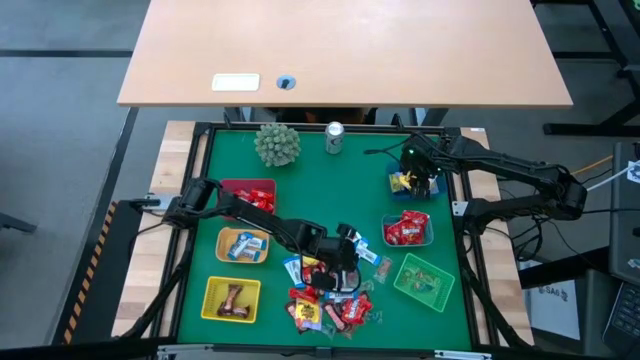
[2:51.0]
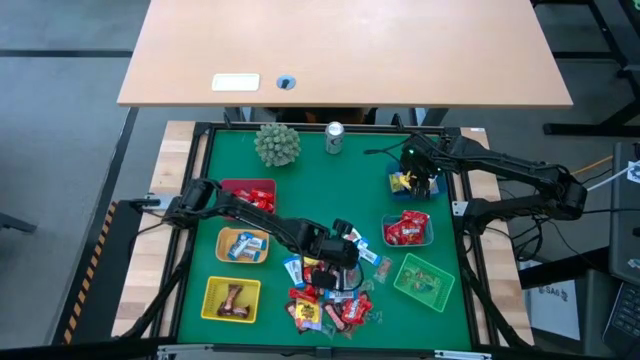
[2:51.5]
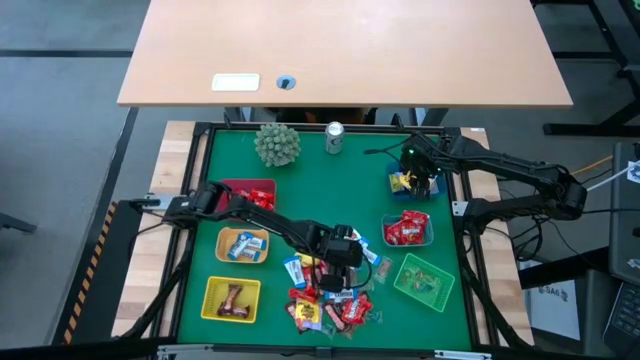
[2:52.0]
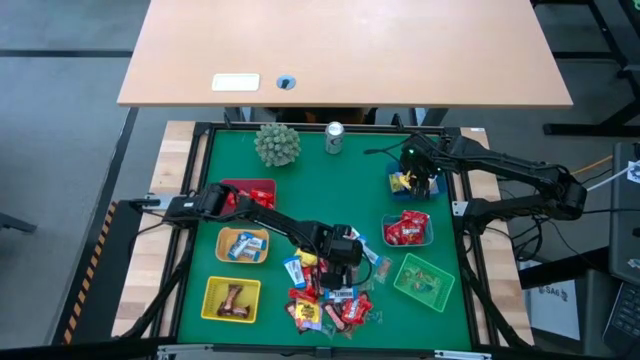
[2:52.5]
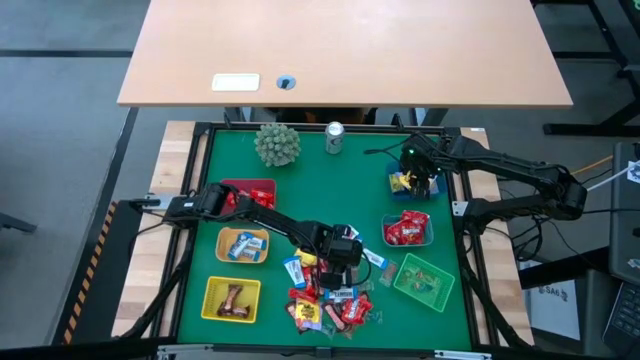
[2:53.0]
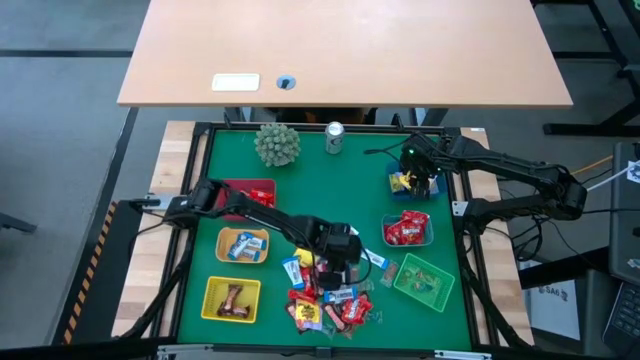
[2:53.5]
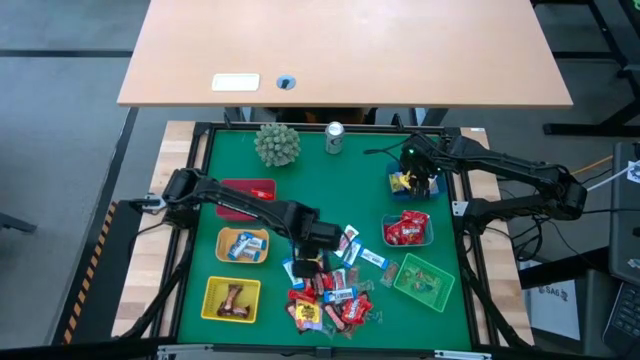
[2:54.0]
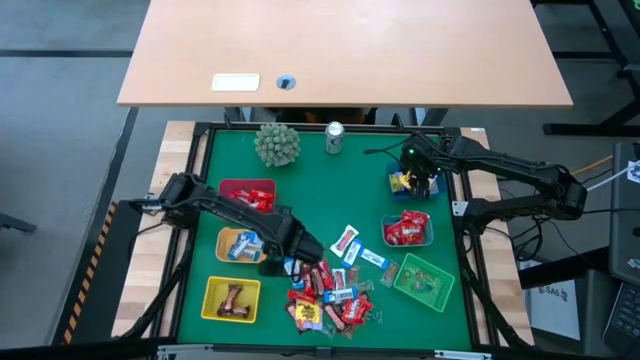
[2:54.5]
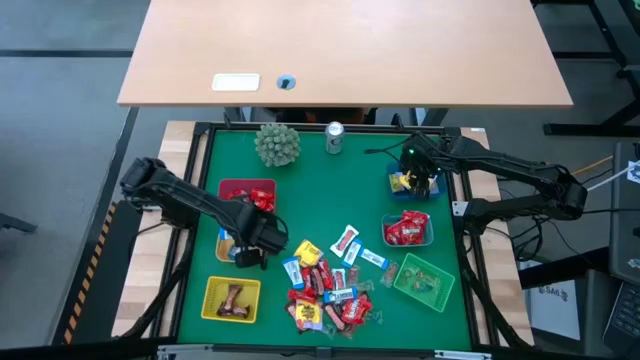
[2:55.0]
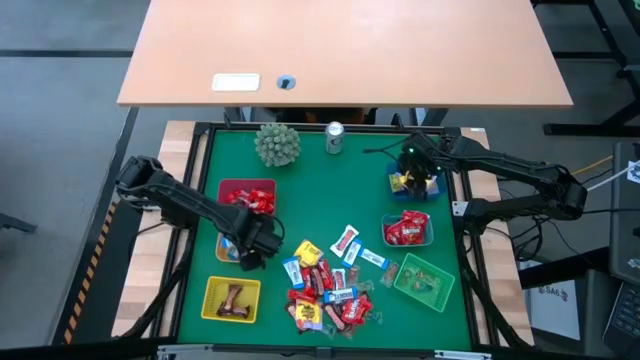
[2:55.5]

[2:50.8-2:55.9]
Task: Sort candy
Put the white chocolate bar into the orange bin

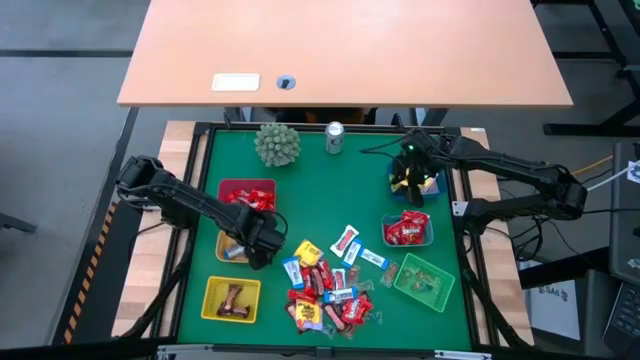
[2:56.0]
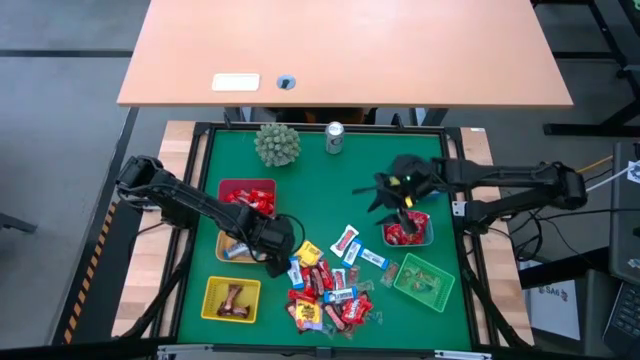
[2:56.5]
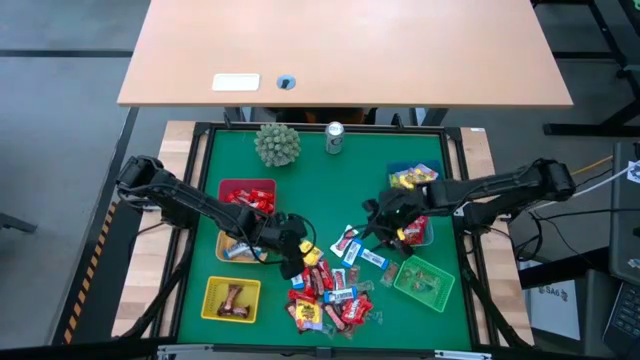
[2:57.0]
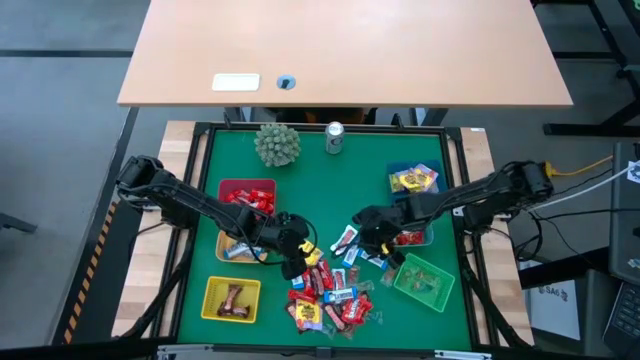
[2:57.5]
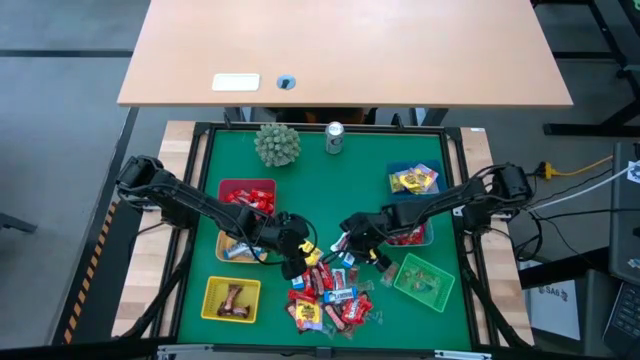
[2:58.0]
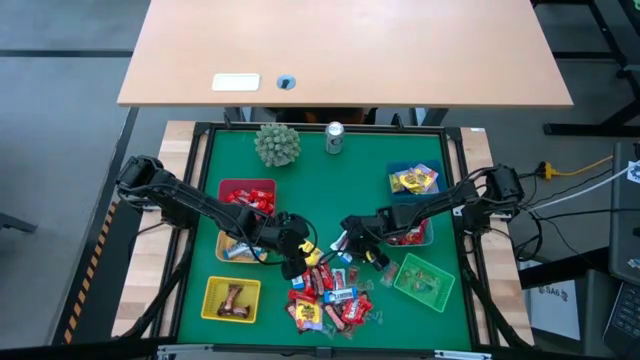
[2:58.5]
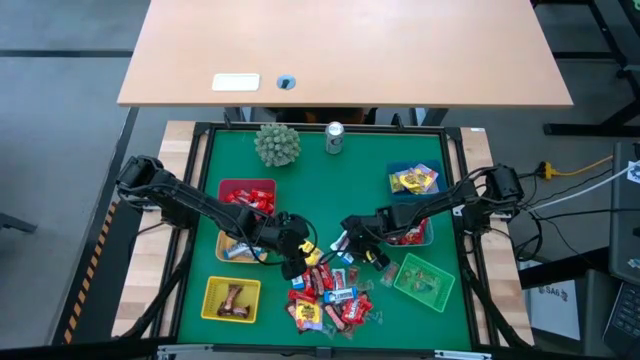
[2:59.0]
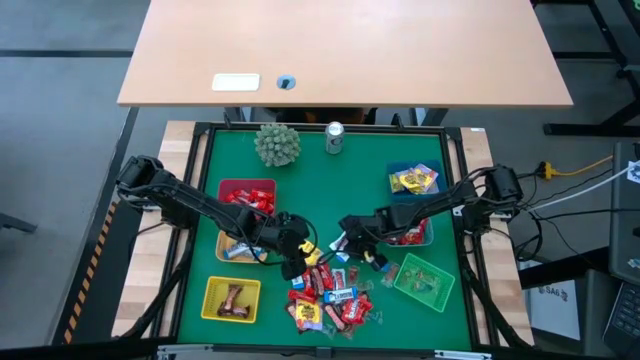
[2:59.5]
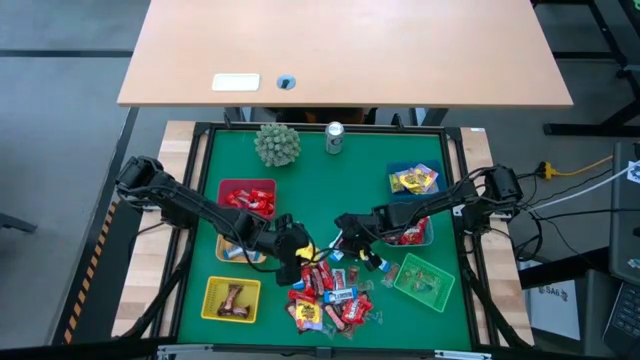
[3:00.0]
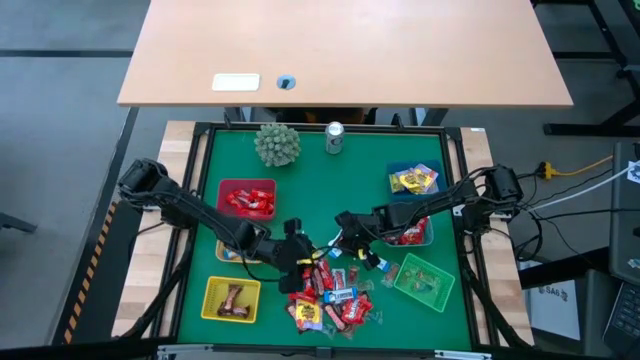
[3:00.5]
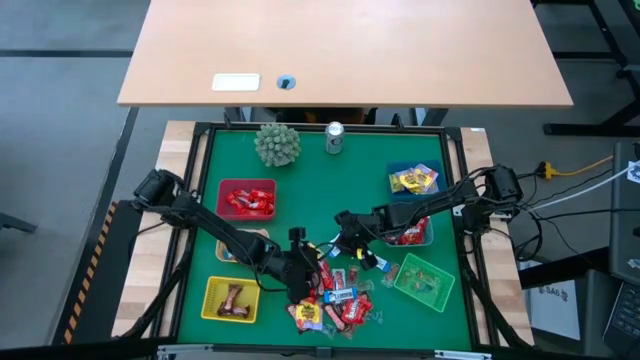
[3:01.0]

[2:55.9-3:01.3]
Put the white chocolate bar into the orange bin

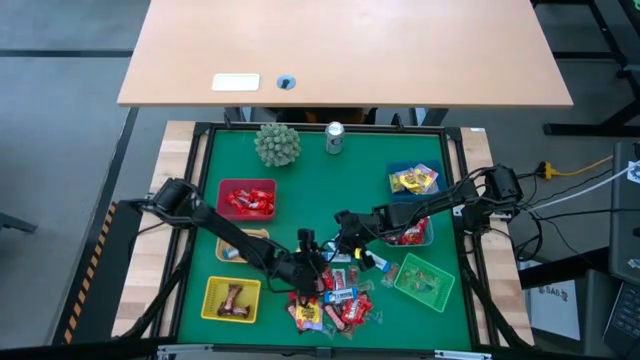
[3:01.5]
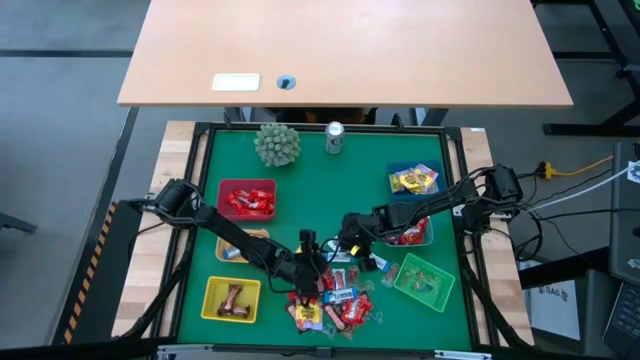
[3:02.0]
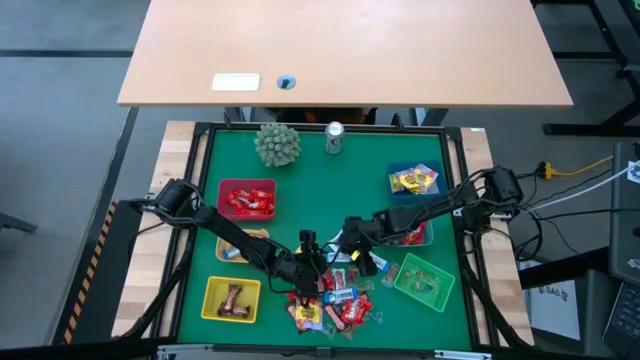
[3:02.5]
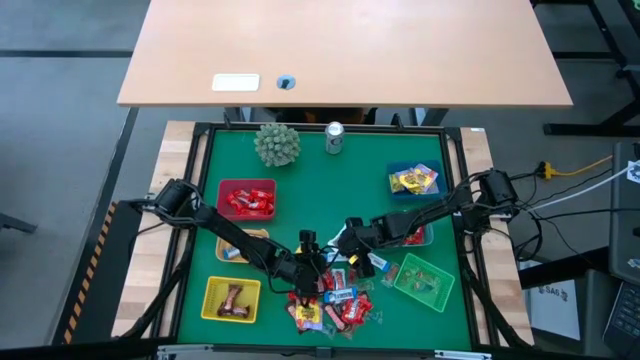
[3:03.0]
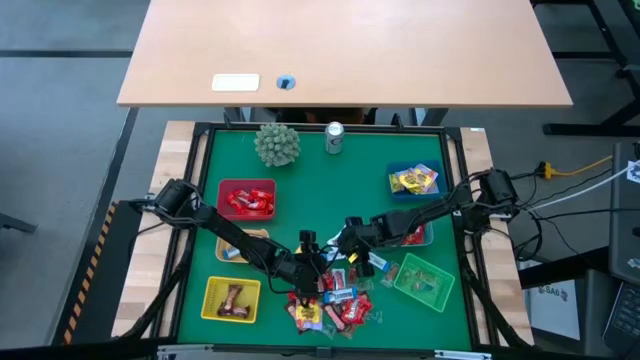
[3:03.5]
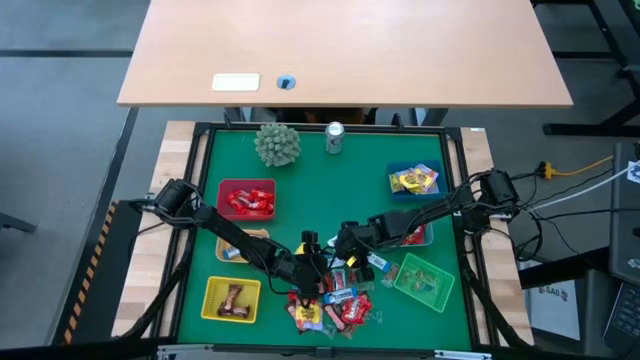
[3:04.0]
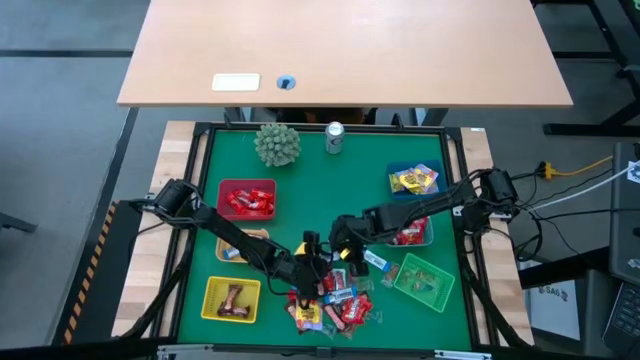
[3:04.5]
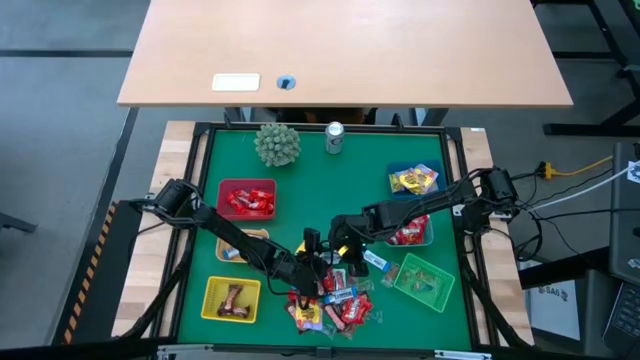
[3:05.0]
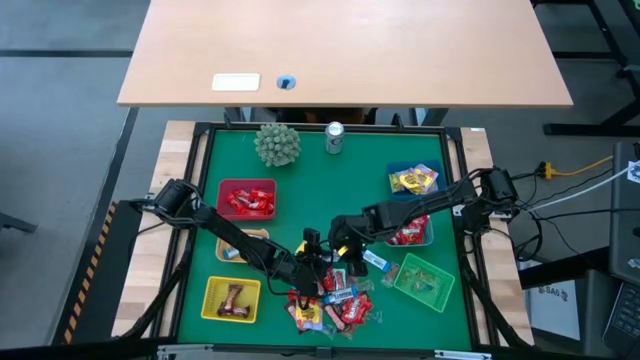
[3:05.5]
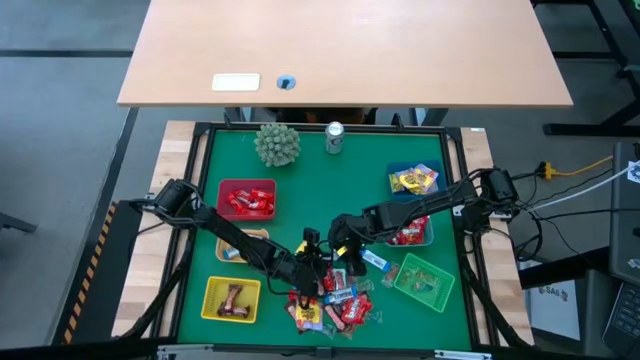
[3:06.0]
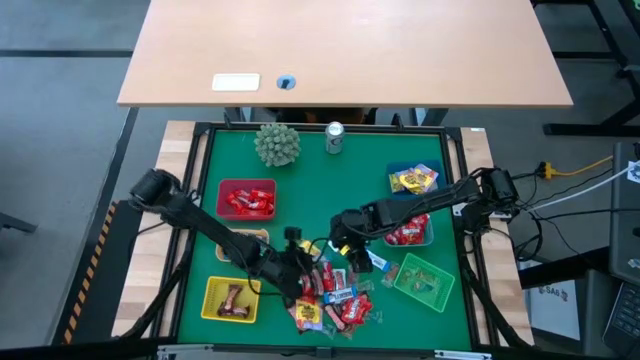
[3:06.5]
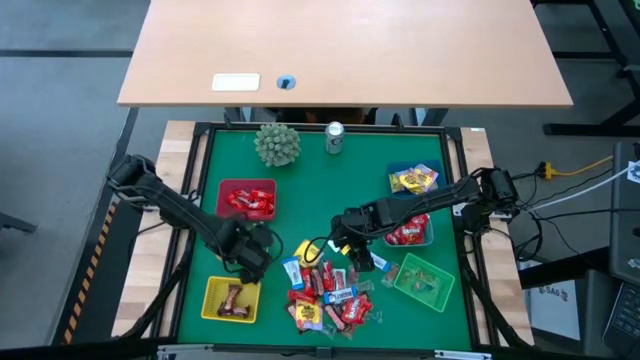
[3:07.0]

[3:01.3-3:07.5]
Put the white chocolate bar into the orange bin

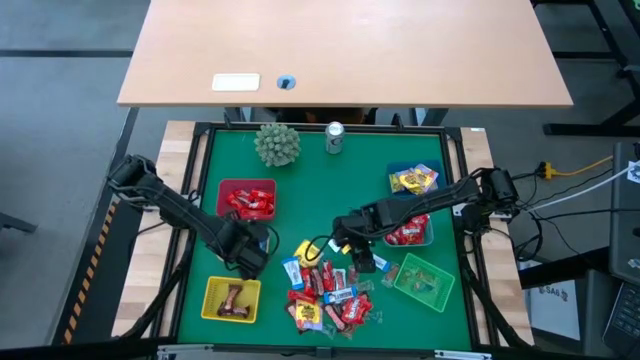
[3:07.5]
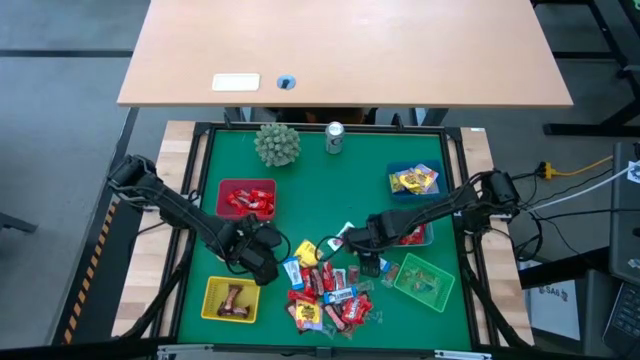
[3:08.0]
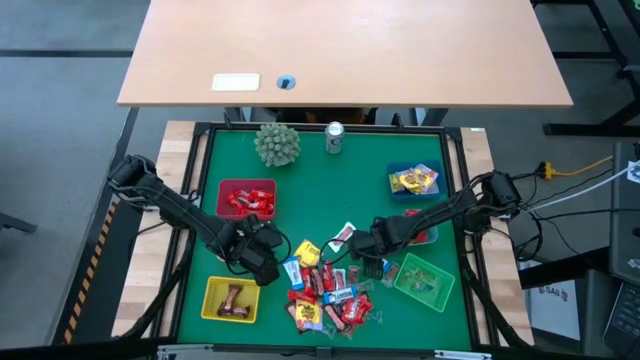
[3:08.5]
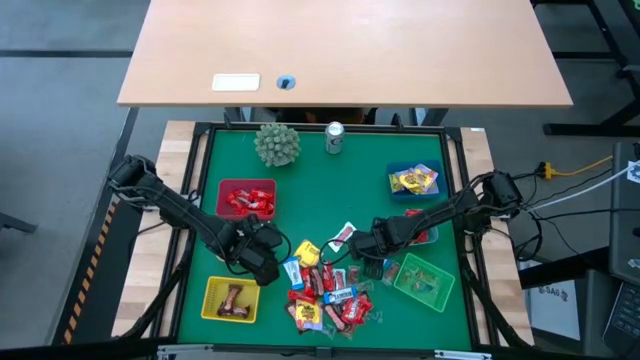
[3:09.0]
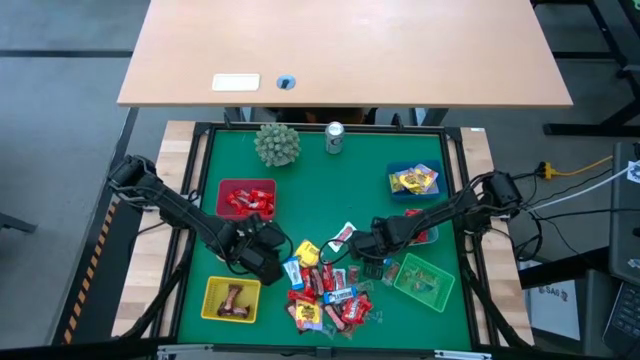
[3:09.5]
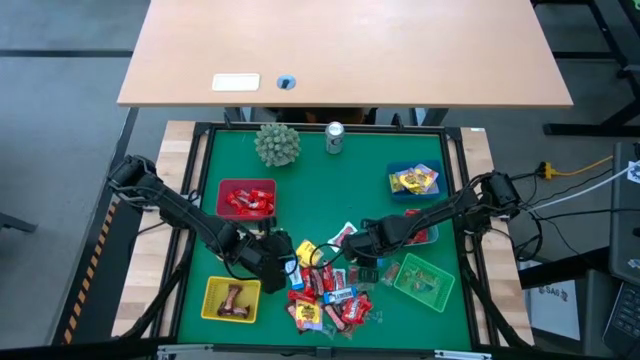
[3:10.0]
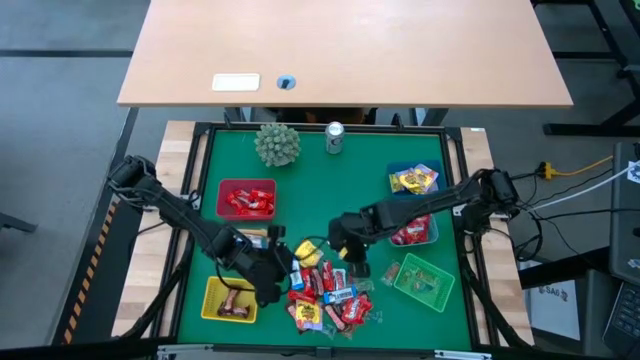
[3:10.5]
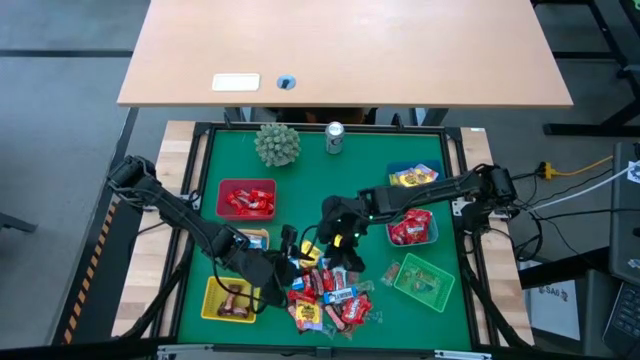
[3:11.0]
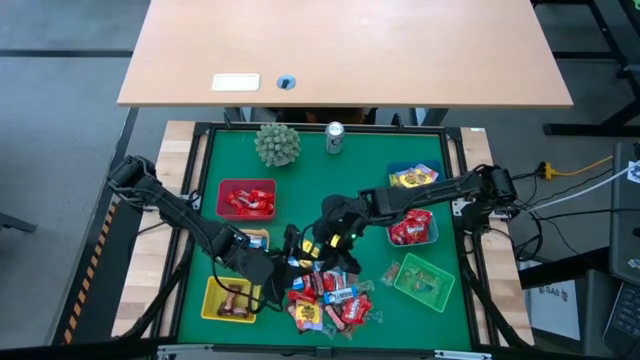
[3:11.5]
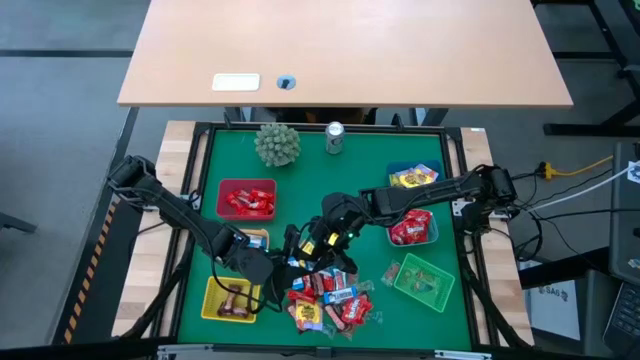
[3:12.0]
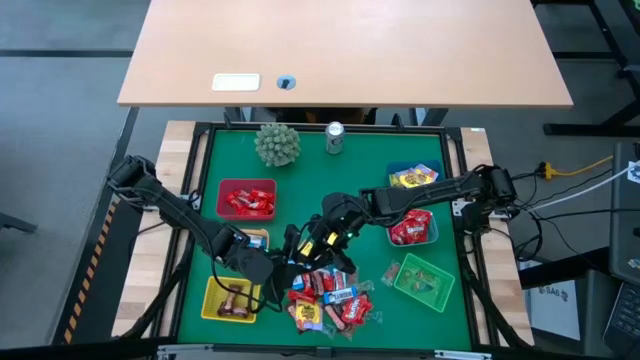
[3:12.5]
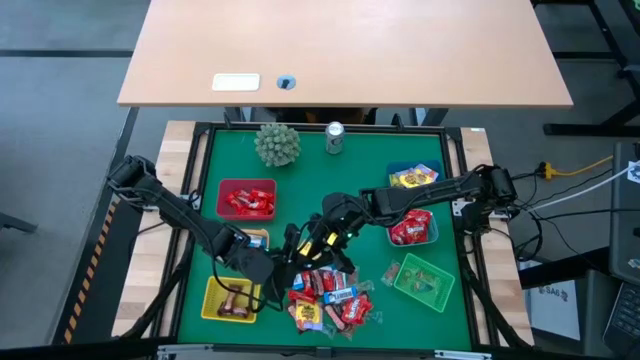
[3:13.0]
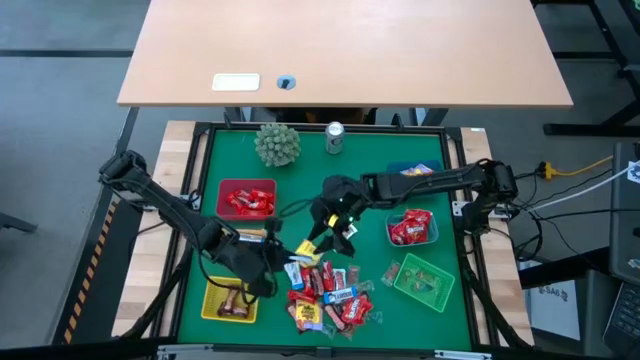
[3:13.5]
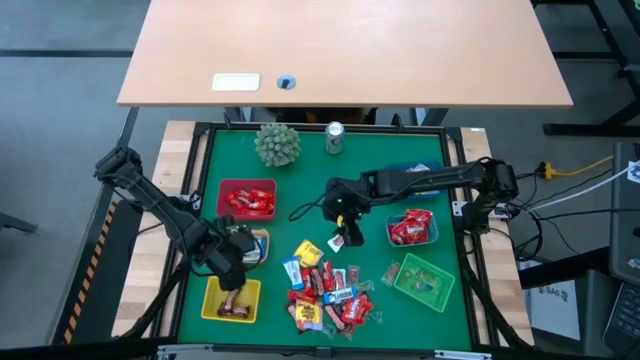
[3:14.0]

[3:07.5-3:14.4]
Put the white chocolate bar into the orange bin
